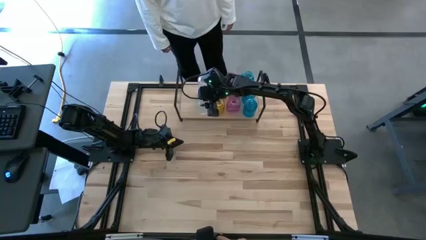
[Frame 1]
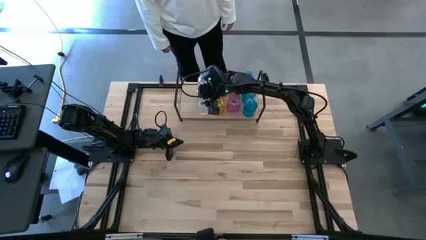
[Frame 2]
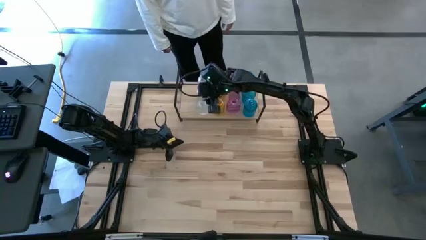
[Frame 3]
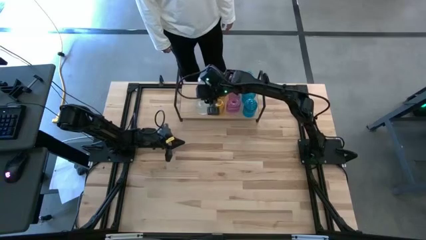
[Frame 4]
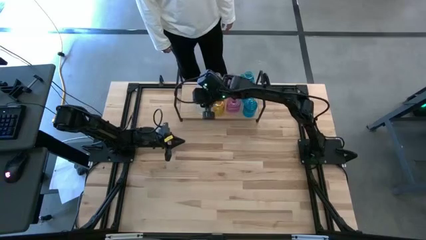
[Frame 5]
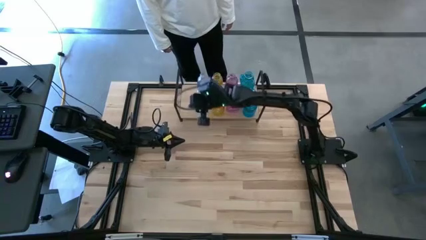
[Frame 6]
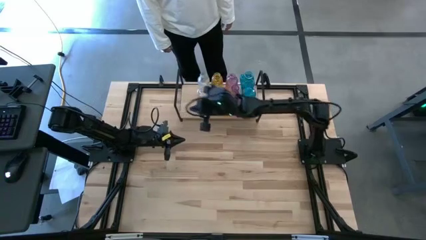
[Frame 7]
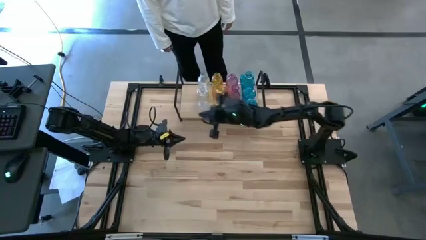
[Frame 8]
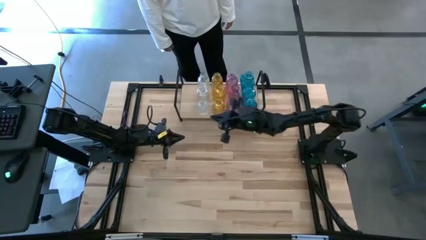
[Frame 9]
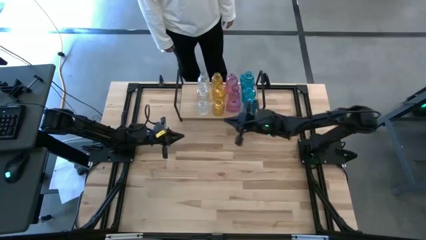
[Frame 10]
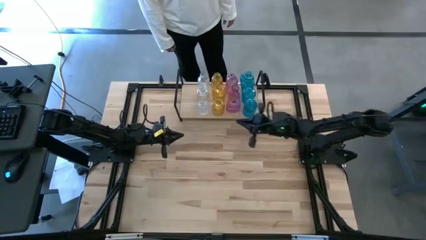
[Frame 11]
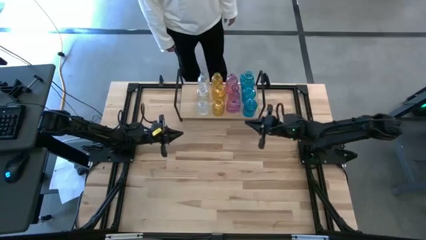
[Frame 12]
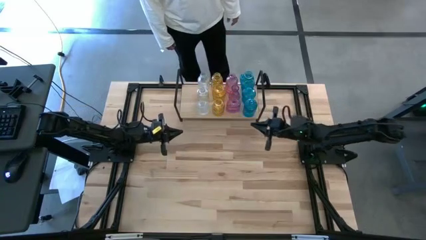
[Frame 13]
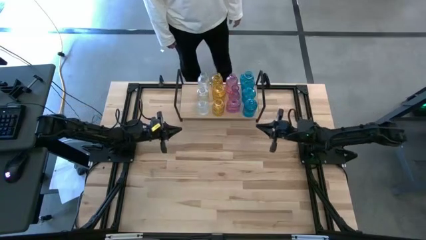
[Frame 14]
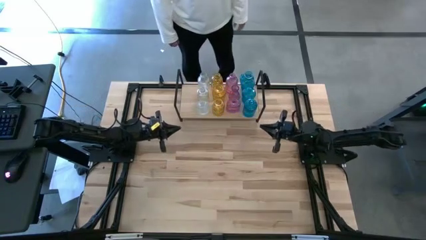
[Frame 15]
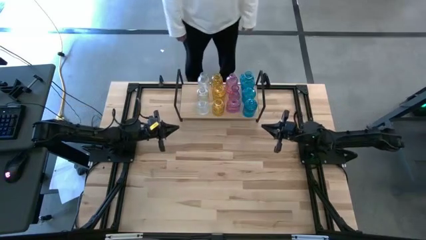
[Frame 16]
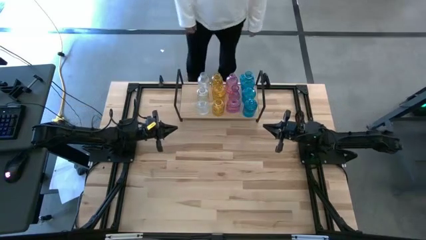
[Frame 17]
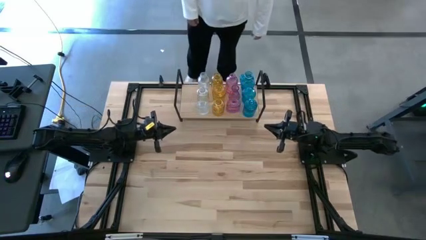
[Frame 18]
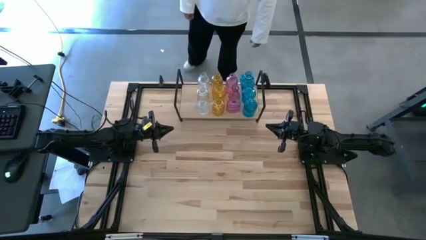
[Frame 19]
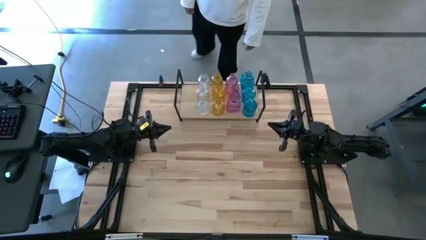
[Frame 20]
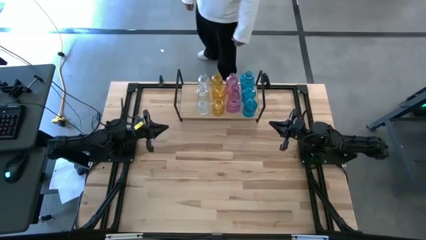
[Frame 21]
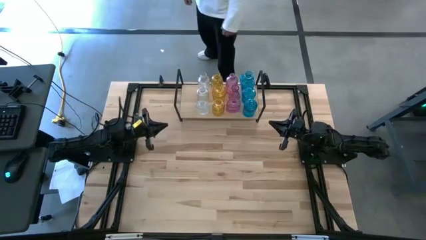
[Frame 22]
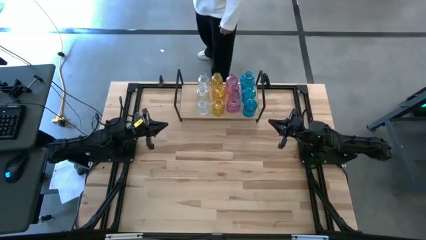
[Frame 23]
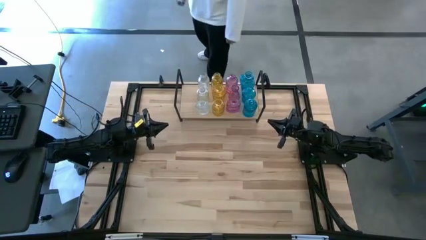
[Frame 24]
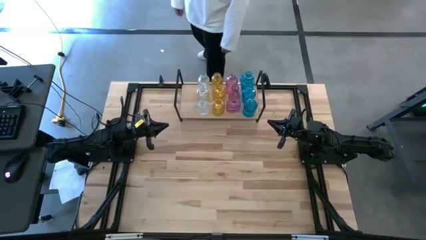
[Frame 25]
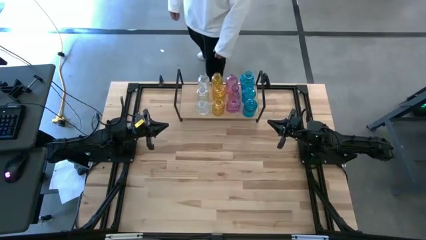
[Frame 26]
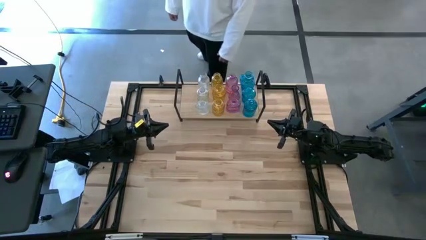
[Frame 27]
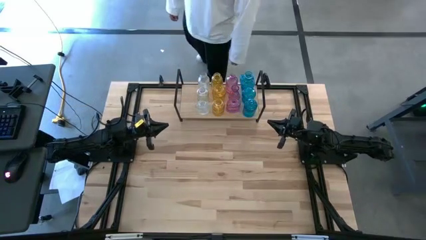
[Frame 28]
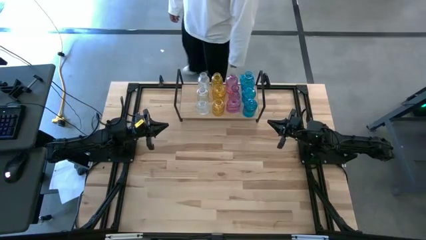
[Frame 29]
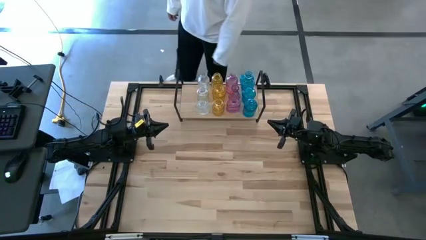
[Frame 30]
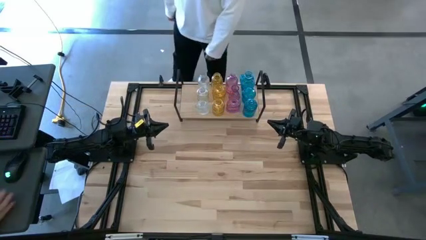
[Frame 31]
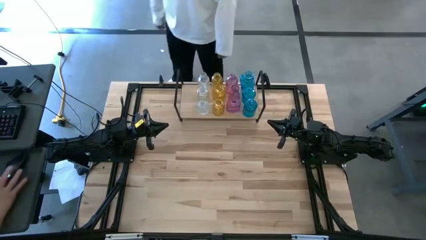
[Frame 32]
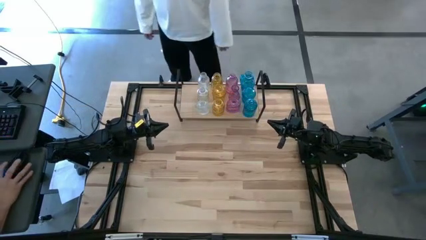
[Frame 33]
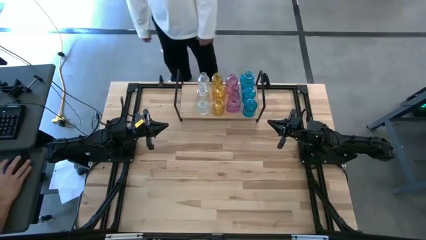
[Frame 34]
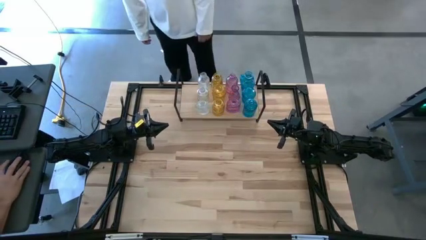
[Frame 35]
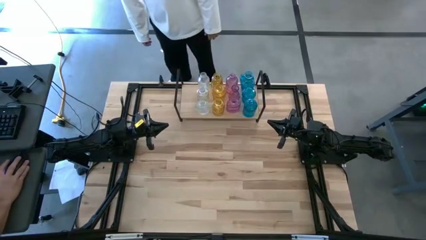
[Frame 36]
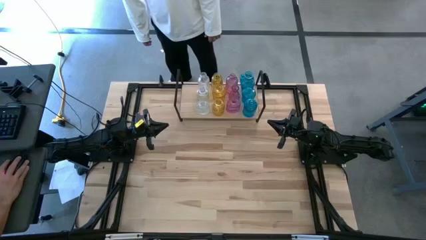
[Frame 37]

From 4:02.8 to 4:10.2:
Task: sort vases onto shelf
Return to Home Position

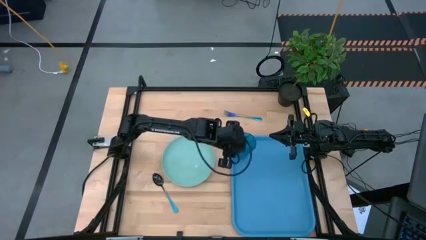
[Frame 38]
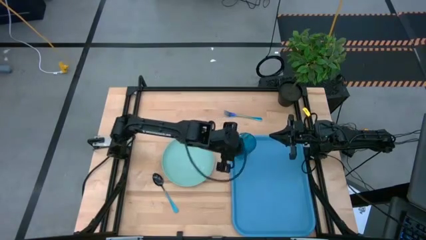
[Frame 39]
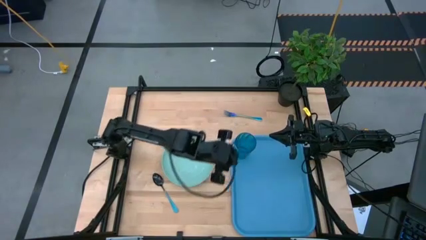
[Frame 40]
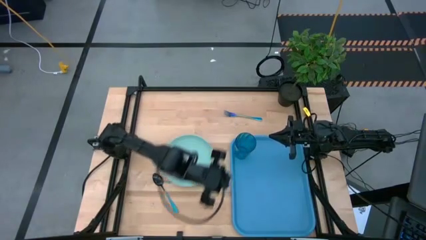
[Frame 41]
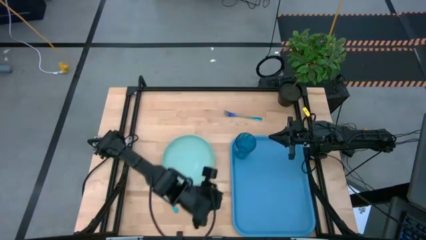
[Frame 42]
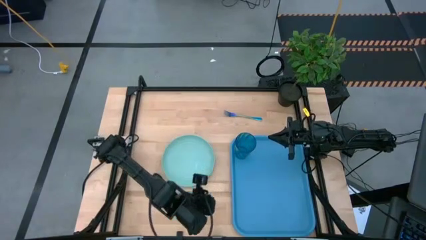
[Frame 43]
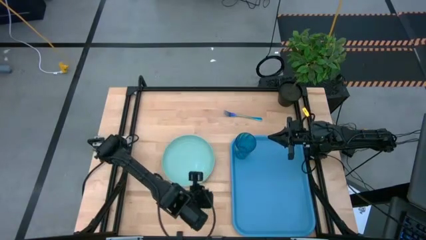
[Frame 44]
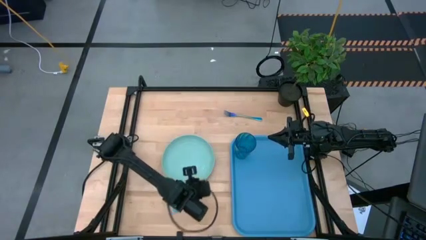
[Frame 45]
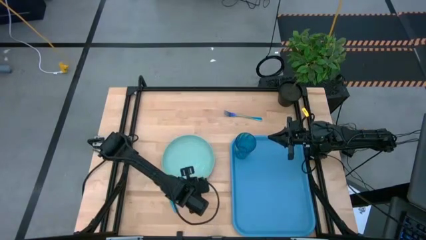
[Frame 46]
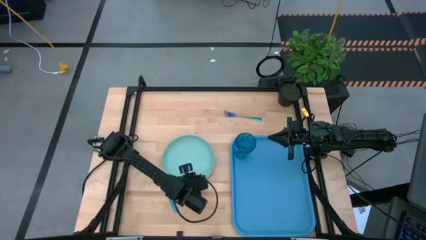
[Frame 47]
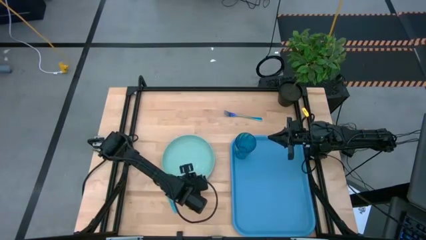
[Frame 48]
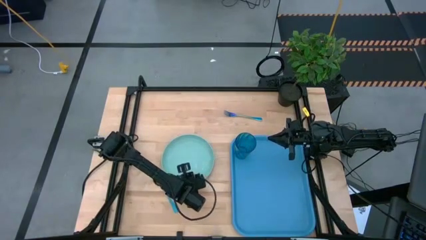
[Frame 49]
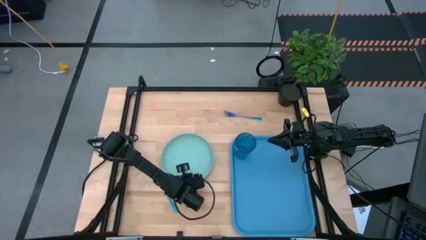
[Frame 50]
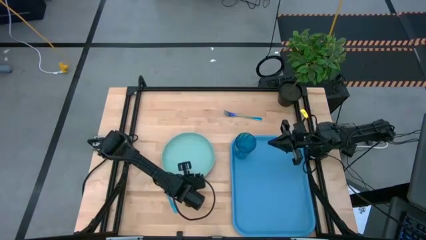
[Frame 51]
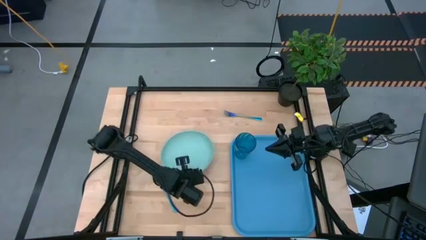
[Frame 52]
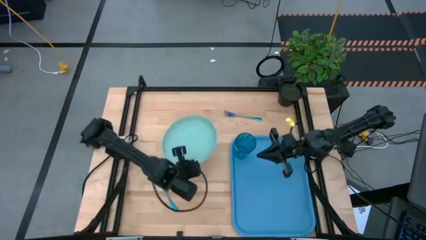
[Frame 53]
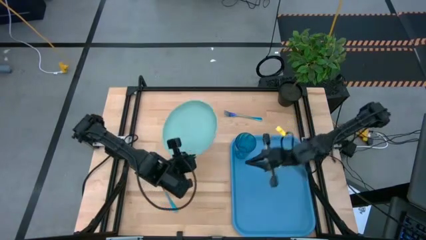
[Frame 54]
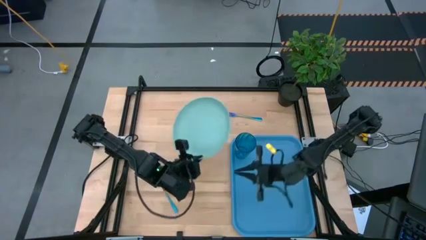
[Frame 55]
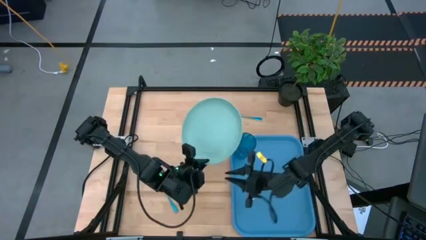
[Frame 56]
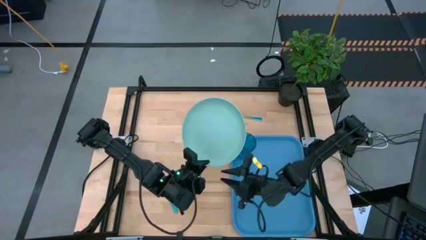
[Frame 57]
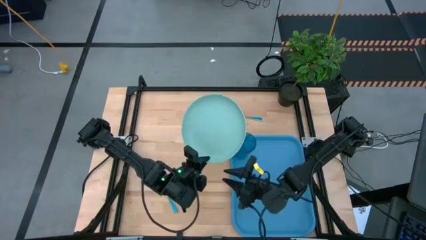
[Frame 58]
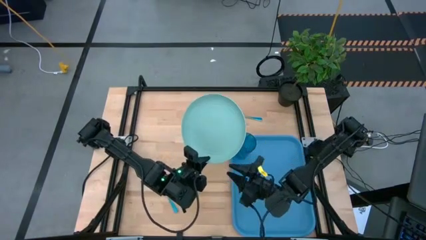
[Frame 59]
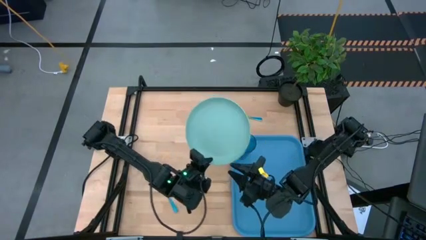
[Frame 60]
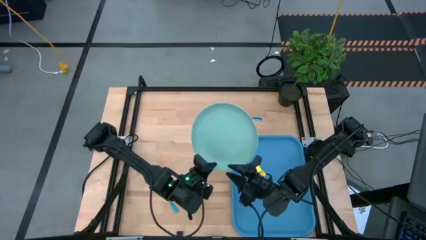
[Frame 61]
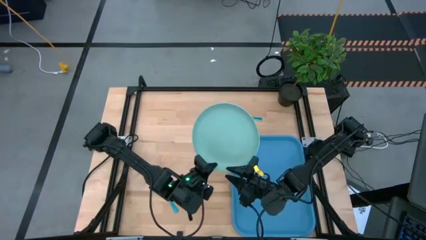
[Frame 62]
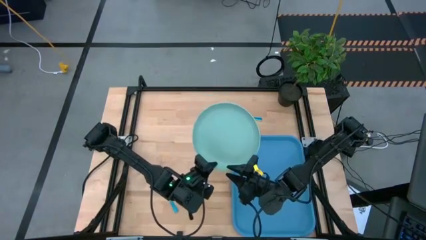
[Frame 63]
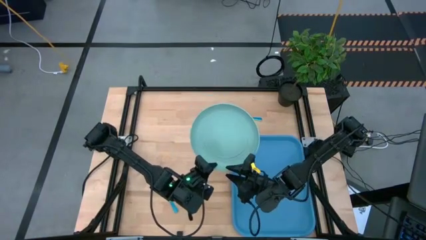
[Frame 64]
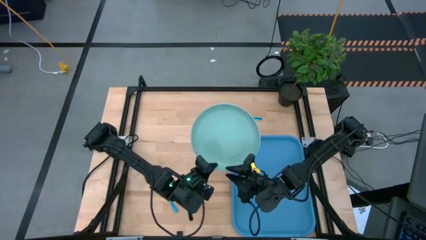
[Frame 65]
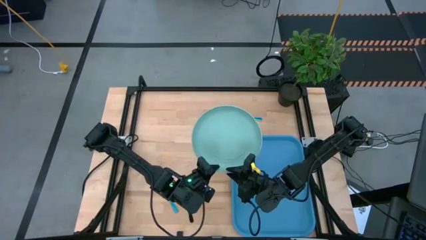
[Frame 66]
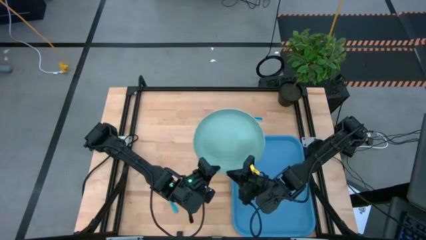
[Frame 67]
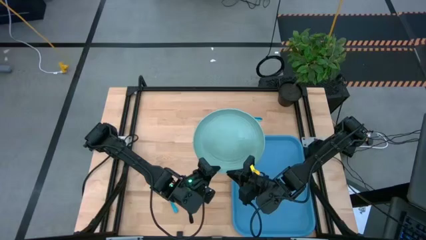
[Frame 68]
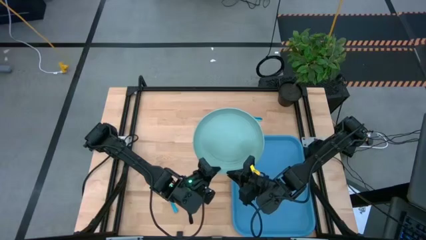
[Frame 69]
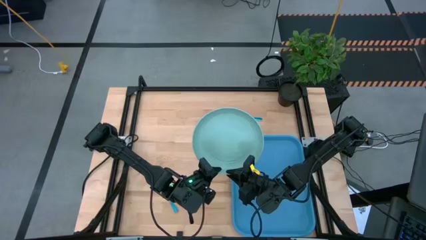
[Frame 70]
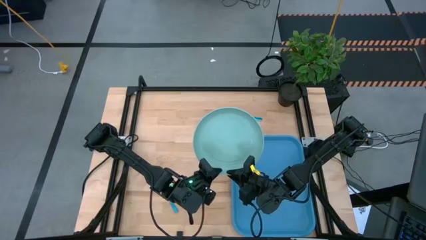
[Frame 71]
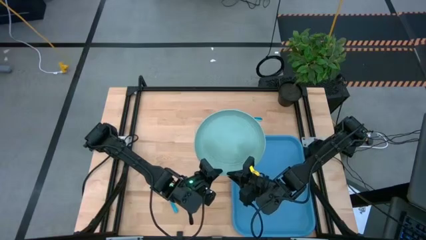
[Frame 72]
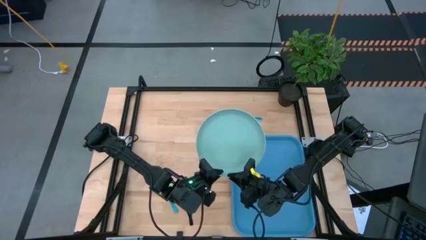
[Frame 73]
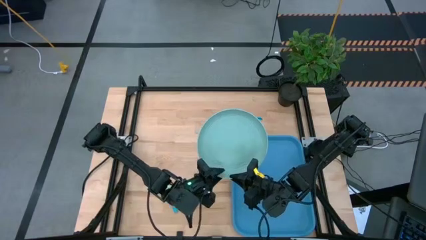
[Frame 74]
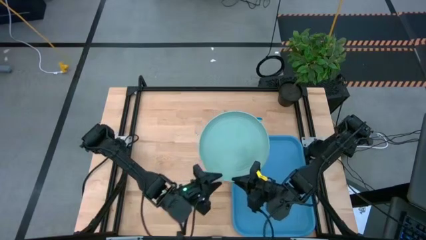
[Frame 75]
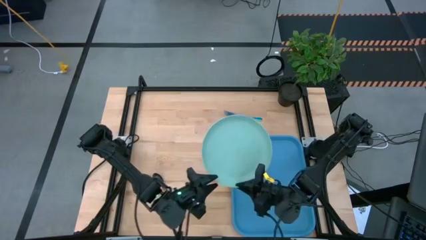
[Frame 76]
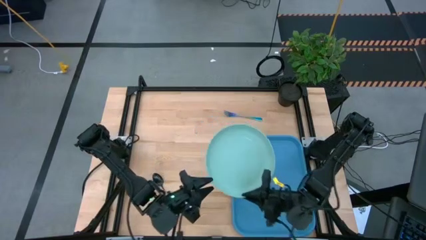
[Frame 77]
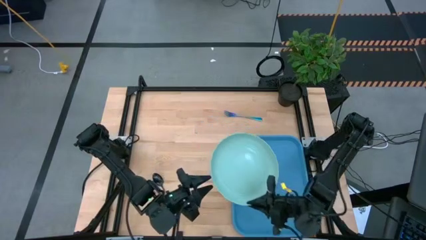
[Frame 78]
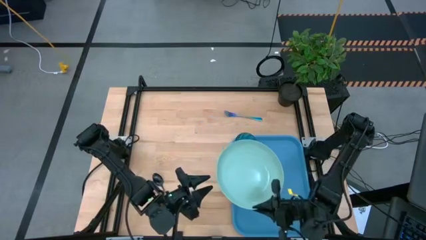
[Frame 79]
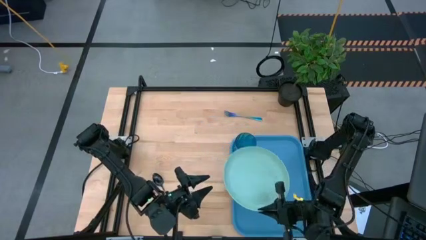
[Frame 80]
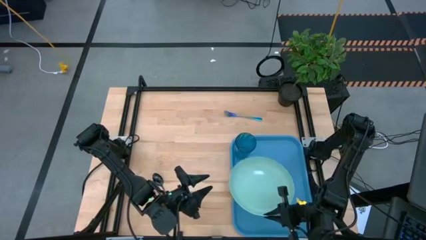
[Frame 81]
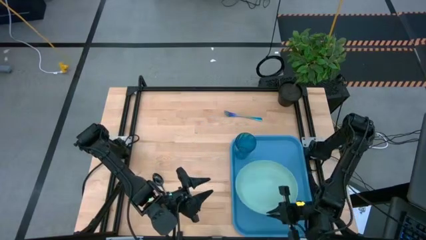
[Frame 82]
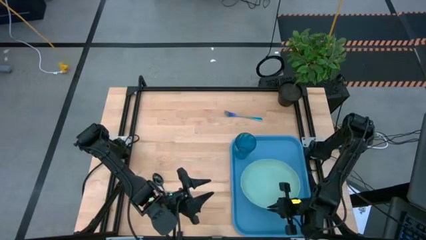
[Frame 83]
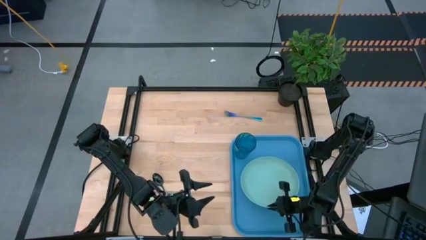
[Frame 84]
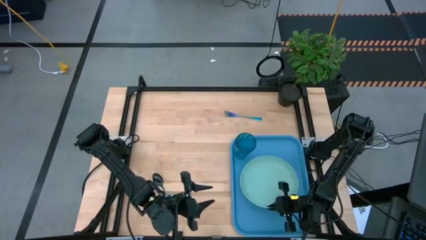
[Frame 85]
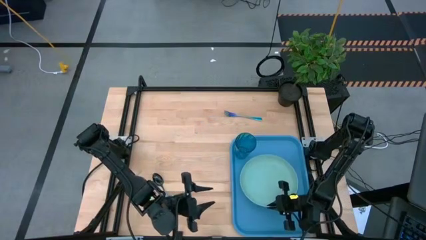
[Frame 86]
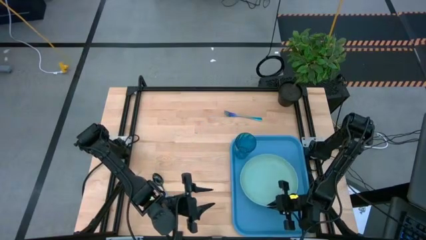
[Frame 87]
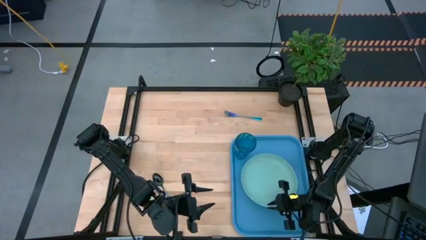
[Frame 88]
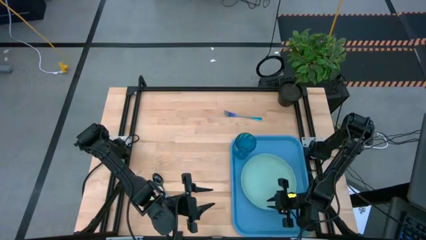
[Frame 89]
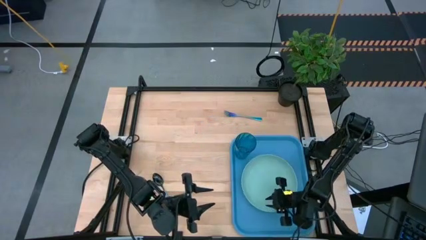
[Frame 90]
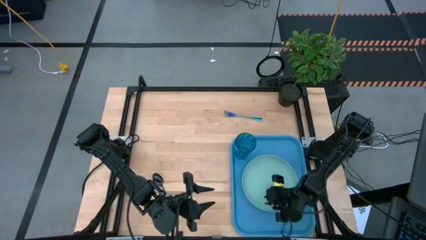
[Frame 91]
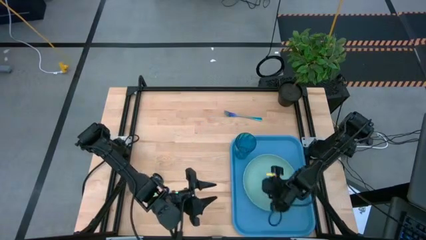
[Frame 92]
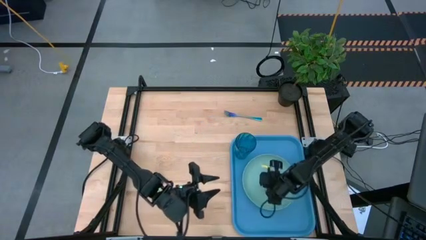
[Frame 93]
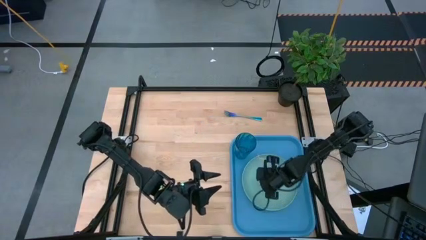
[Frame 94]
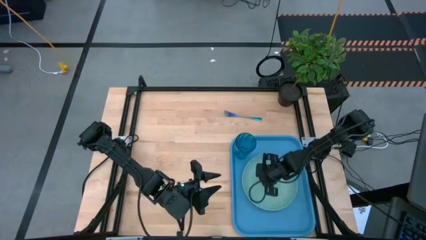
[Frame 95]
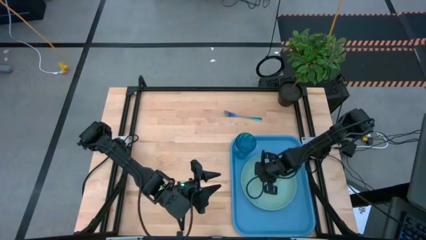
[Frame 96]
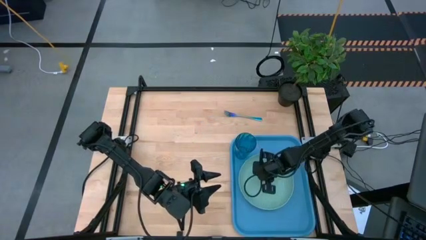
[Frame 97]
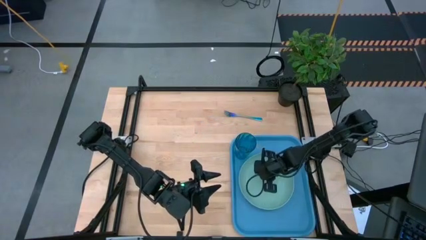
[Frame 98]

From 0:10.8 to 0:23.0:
Task: Pick and place plate/cup/fork/spoon on tray
Put the green plate on the blue serving tray to the left of the blue glass
